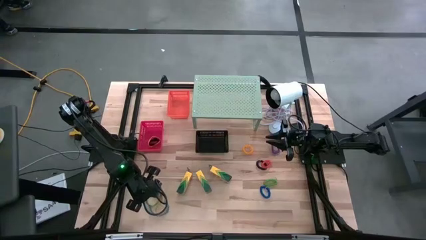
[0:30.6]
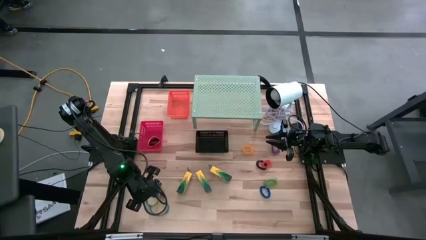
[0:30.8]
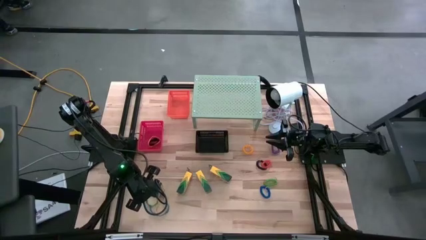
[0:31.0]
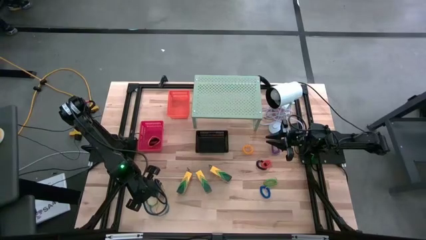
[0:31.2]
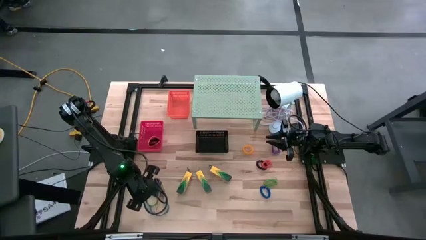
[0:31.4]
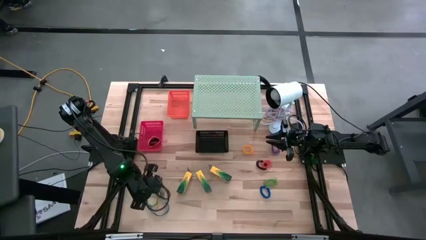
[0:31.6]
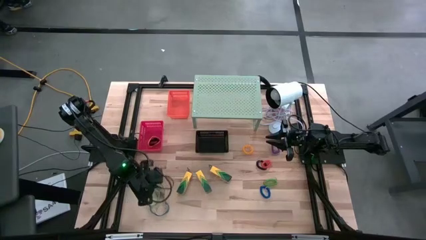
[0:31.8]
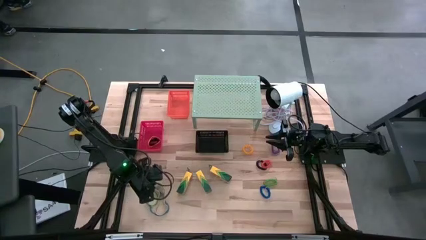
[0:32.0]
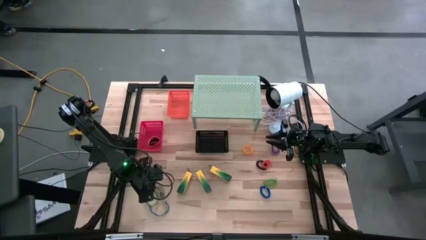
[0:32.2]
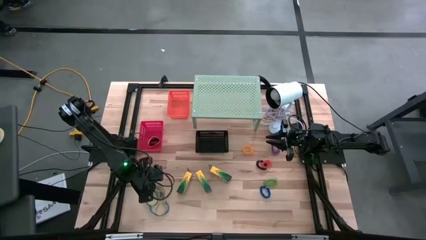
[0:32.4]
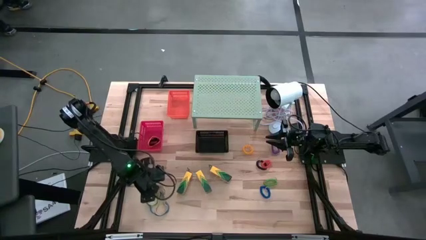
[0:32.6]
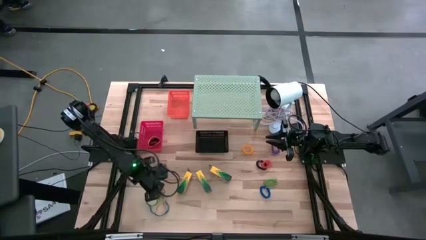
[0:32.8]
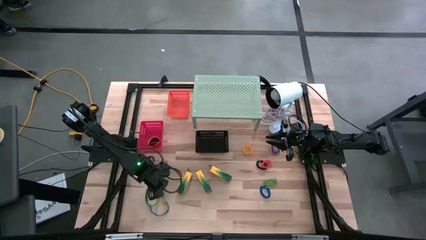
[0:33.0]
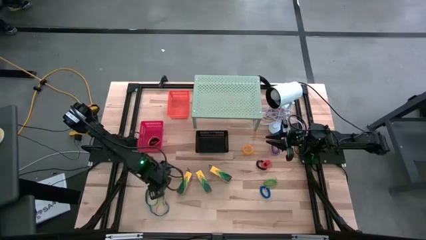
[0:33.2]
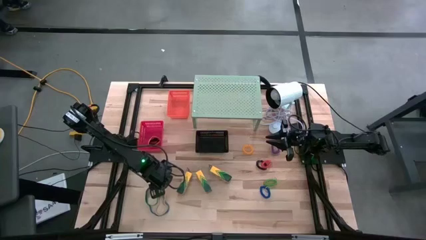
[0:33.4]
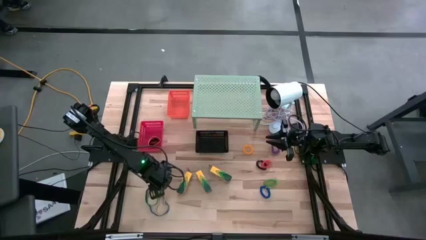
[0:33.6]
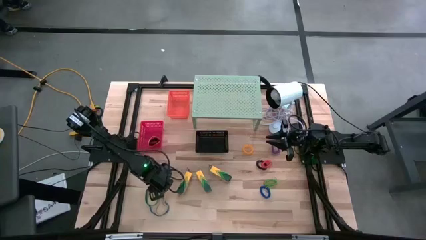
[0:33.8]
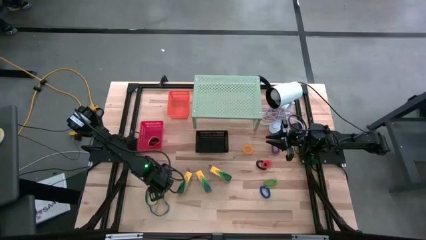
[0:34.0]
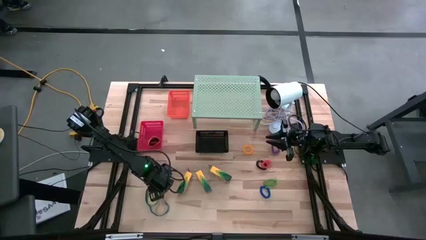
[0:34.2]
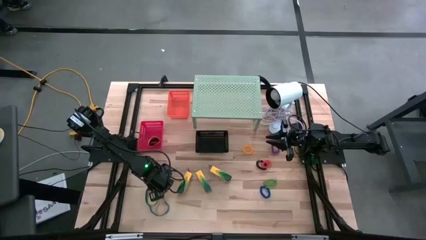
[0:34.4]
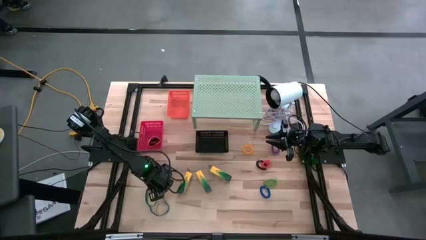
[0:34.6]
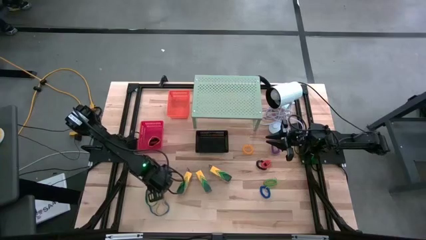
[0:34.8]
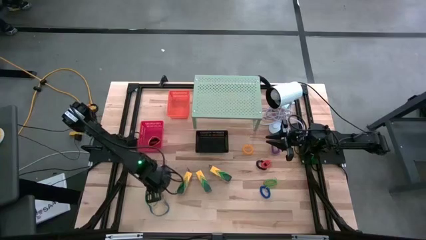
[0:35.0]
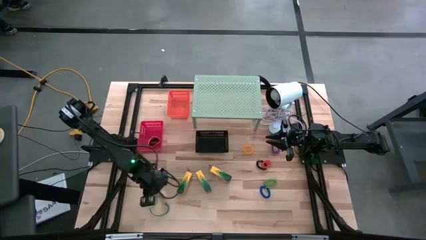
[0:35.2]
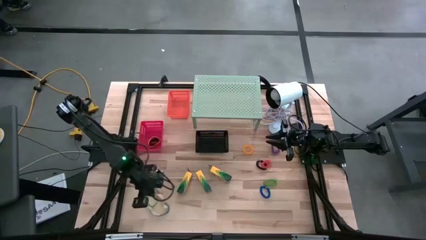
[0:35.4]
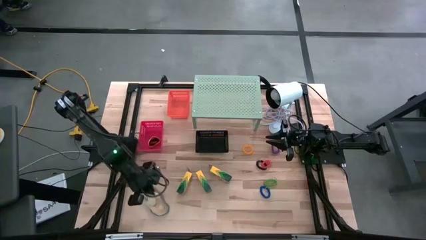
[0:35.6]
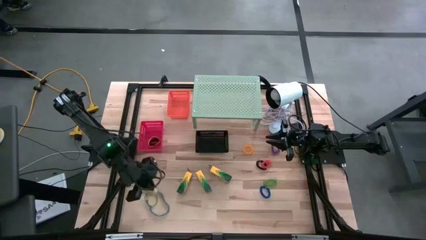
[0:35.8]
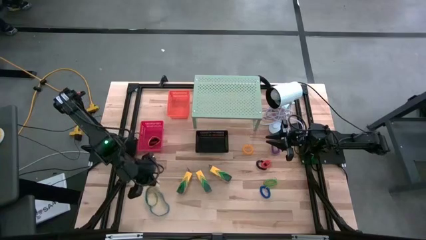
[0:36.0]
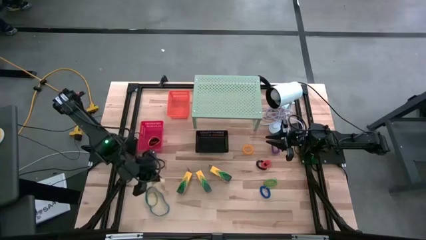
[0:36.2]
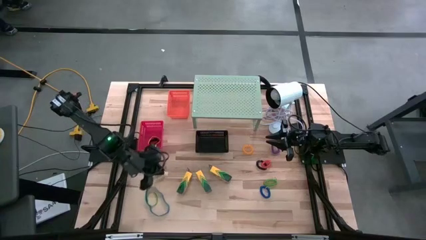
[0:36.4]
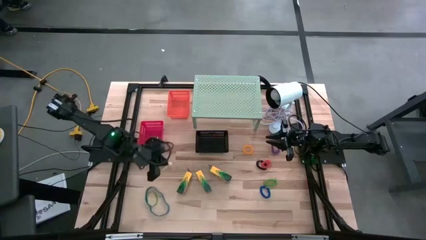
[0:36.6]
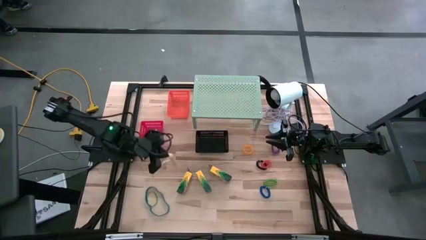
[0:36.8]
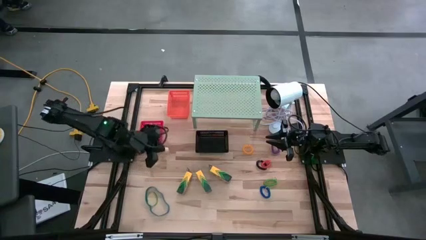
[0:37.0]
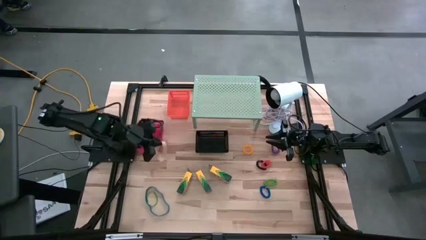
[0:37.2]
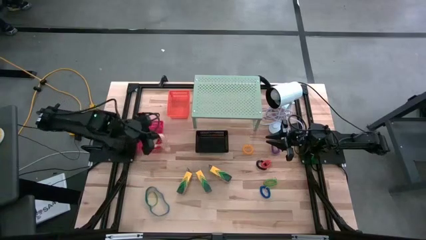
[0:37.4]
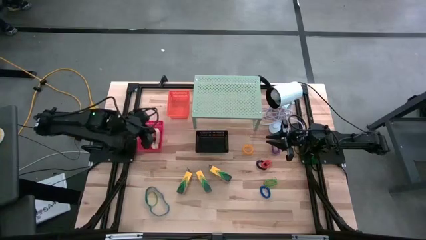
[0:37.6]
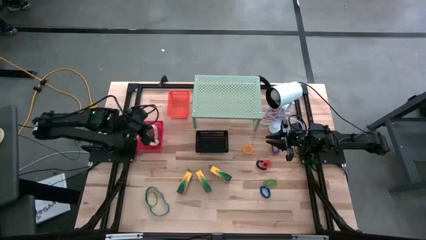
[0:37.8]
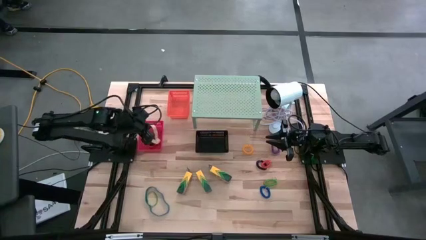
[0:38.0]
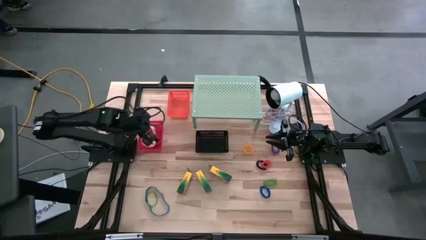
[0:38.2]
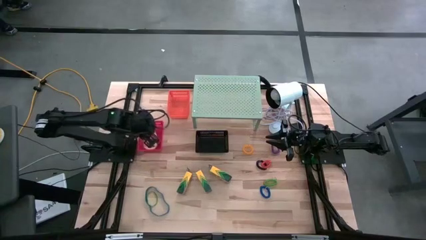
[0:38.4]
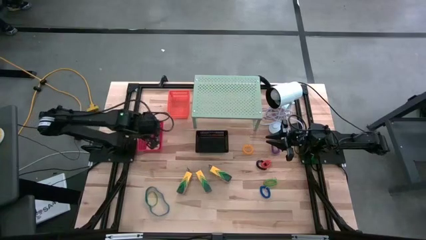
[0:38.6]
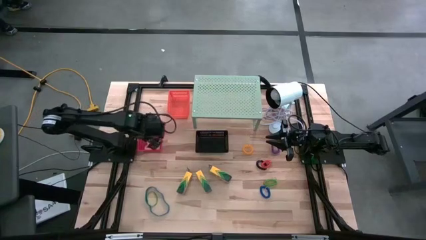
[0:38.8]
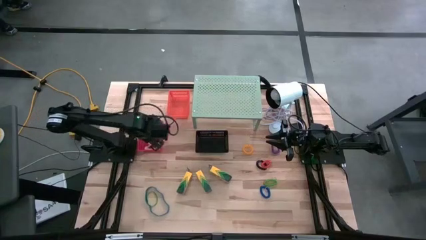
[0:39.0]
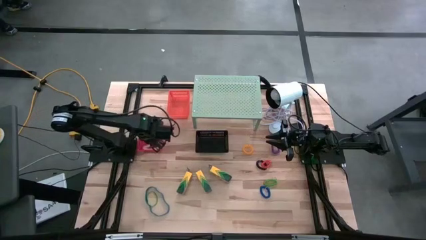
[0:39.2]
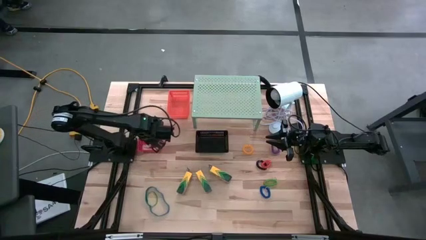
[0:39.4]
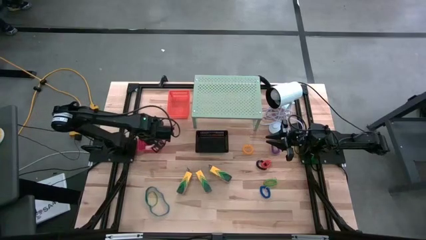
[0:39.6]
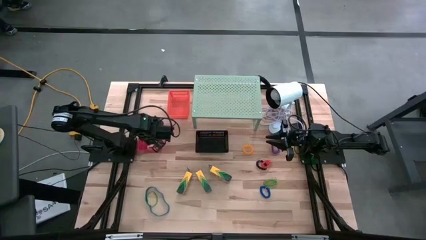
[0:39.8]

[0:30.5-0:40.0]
Task: Pick & Place Office Desk Supplies
Put the white rubber band into the orange bin on the shelf

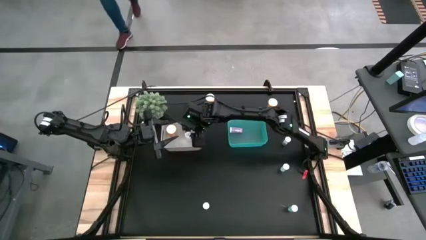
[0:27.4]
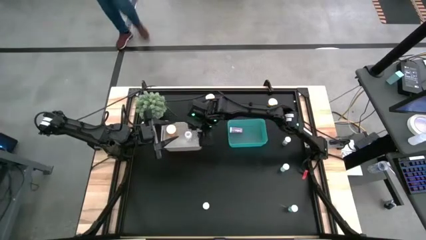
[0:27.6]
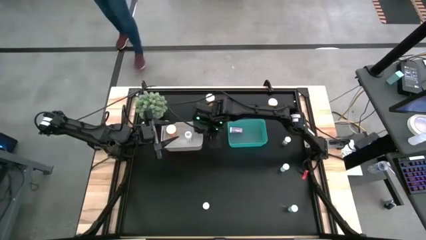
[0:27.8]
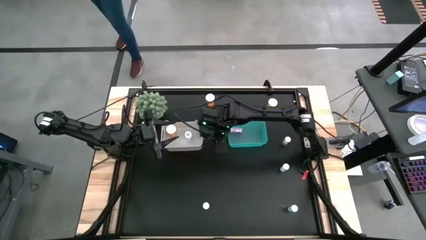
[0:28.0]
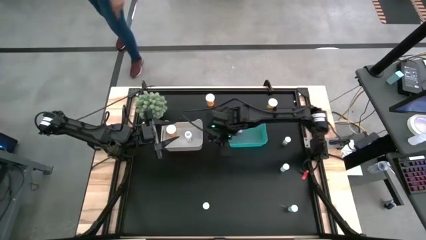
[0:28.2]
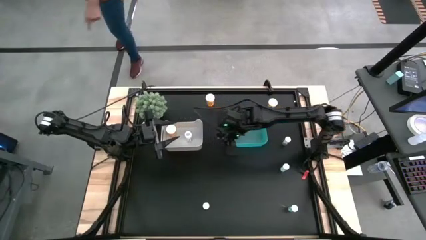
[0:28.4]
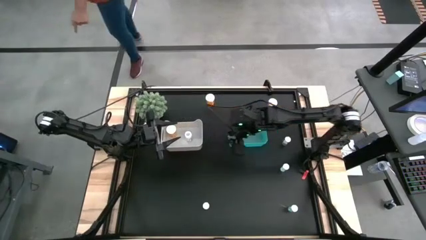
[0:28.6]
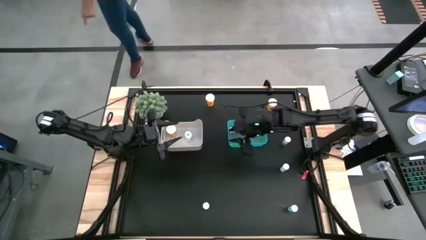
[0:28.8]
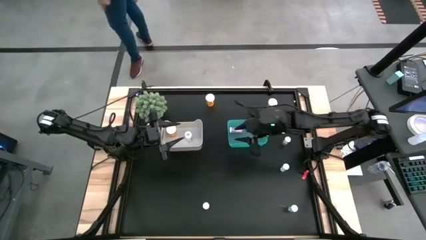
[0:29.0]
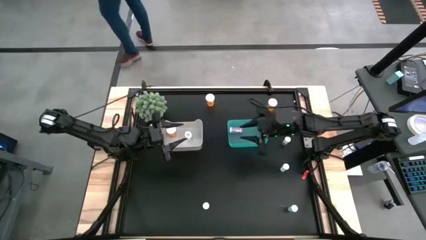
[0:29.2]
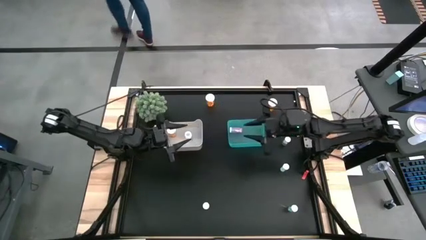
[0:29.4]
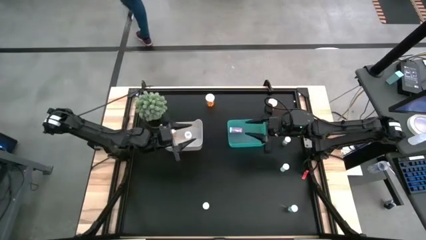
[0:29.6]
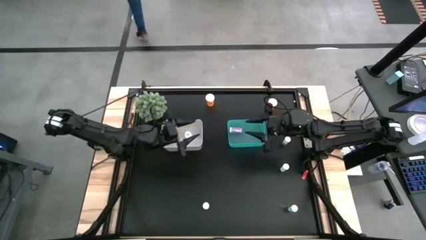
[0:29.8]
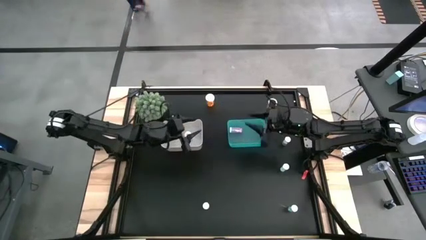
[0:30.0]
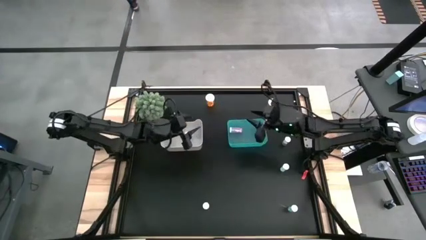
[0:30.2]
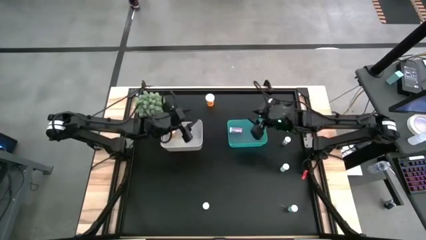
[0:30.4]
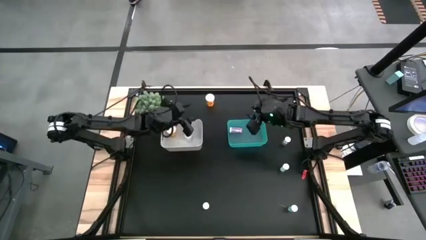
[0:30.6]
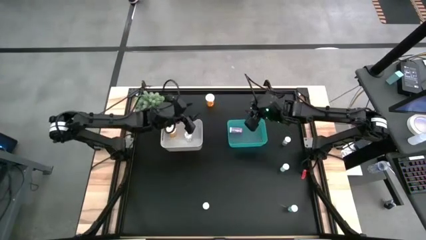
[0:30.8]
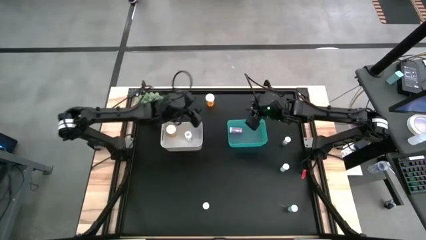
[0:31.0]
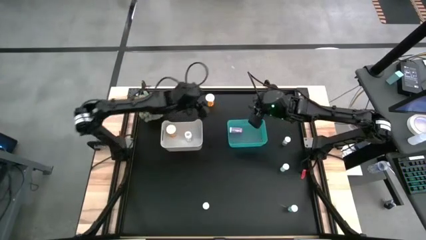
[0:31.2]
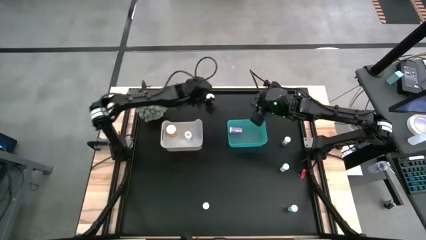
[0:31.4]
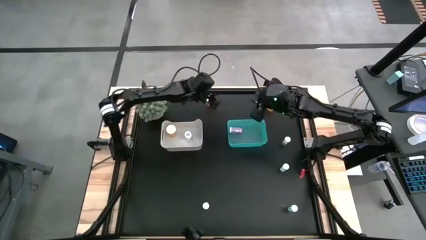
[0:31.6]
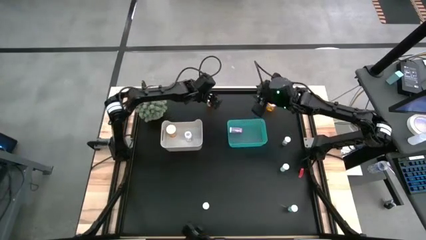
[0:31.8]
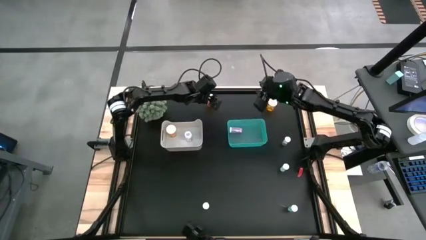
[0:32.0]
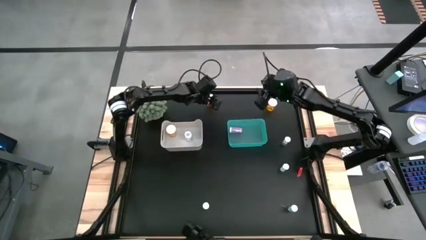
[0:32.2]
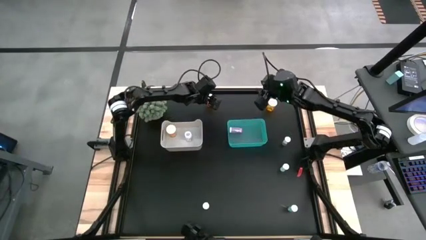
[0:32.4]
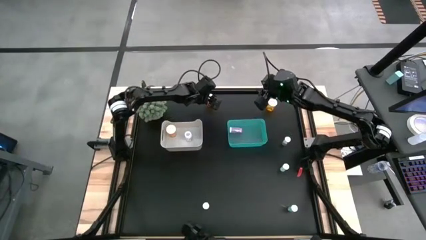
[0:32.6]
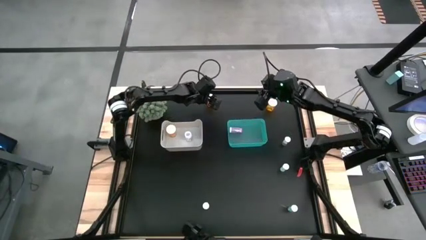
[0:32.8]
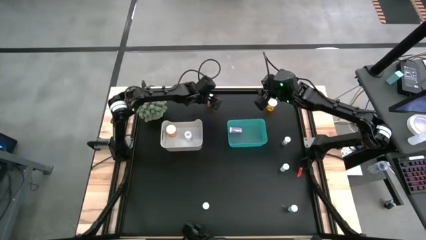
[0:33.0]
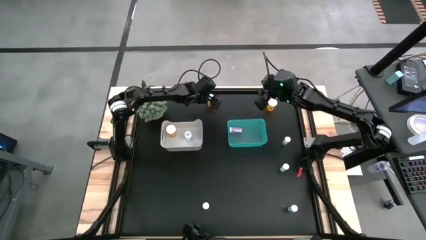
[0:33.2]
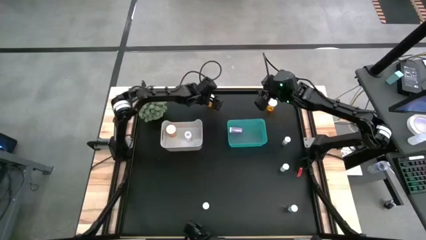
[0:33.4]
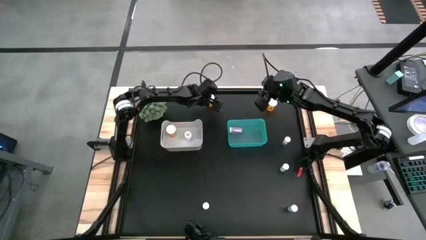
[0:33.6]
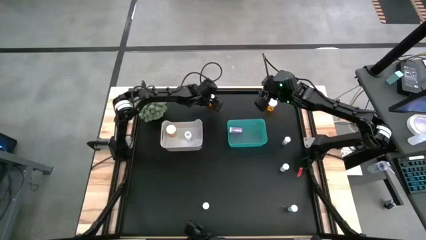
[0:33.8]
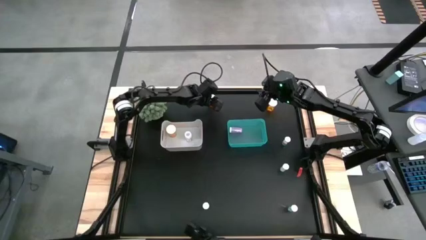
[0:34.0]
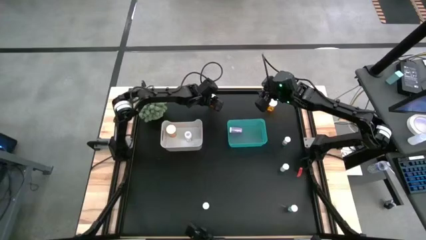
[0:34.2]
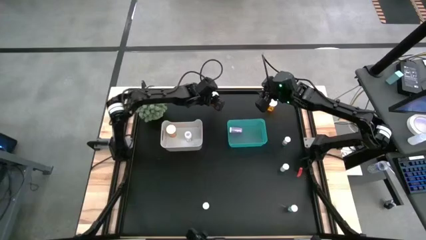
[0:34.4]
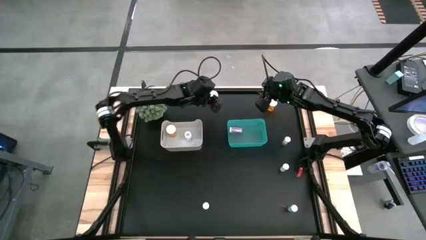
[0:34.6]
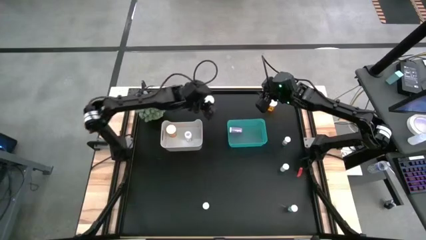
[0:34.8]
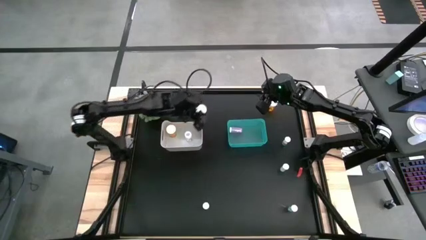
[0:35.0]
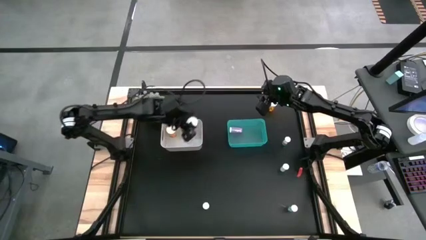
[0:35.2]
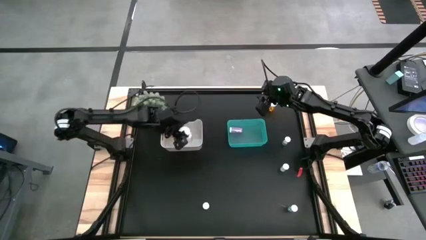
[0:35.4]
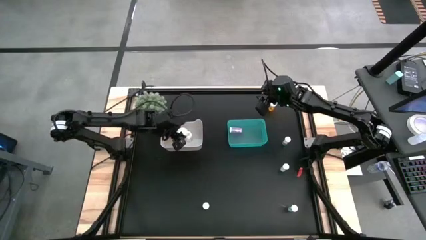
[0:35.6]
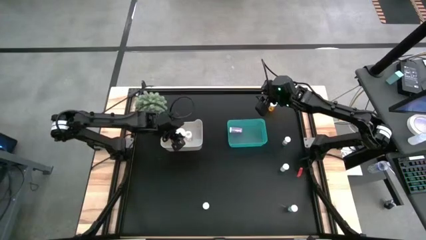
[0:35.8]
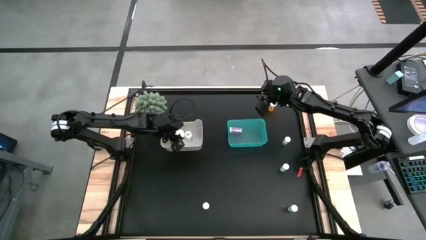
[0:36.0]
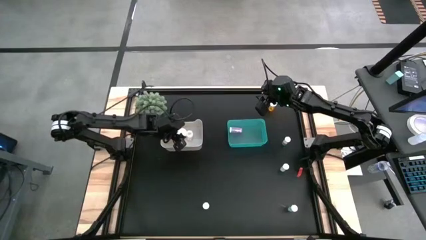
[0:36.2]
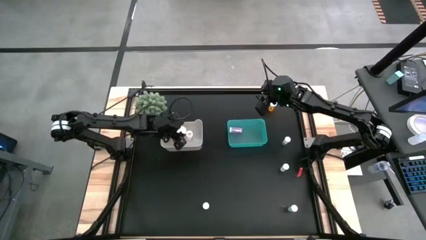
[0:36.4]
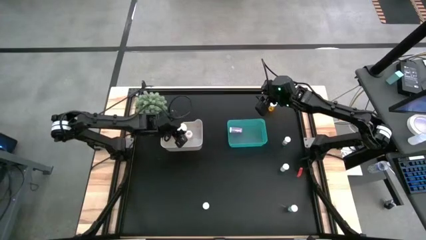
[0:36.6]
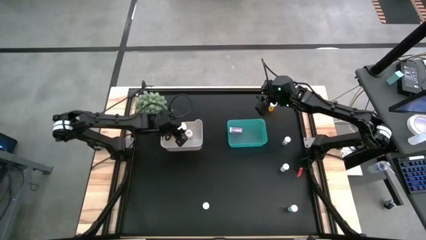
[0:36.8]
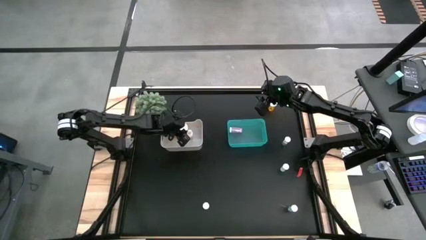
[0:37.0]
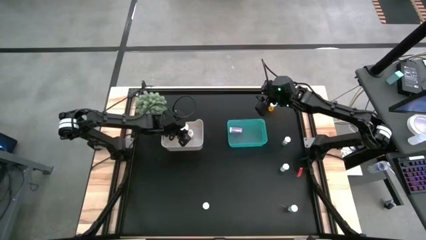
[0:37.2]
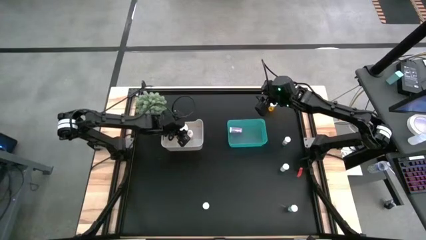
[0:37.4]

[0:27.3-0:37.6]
Task: Pick and place medicine bottles into bin by pill shape (circle, oval)
Put the top left large orange capsule bottle into the white bin
